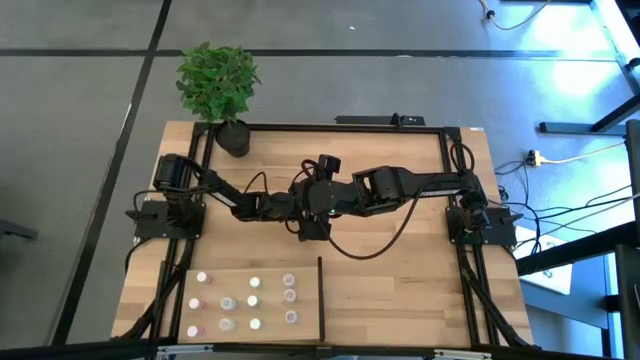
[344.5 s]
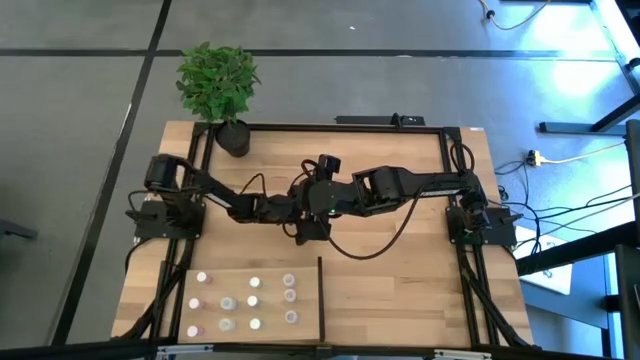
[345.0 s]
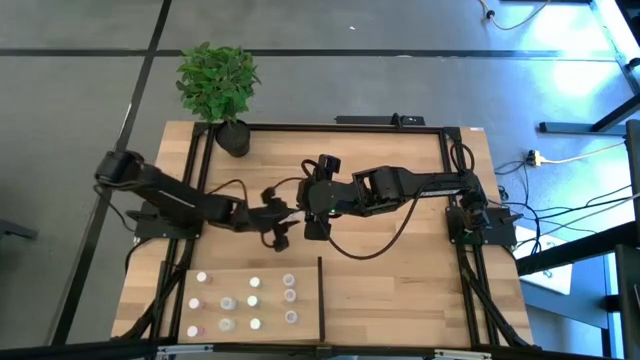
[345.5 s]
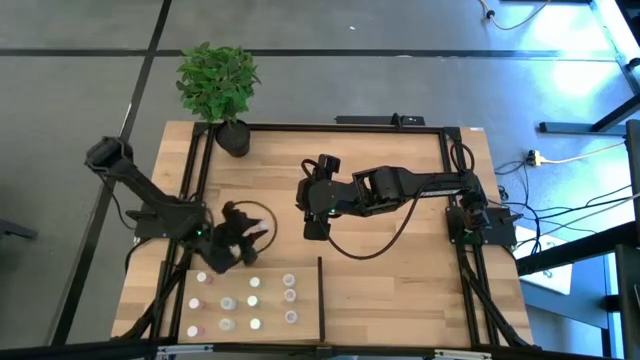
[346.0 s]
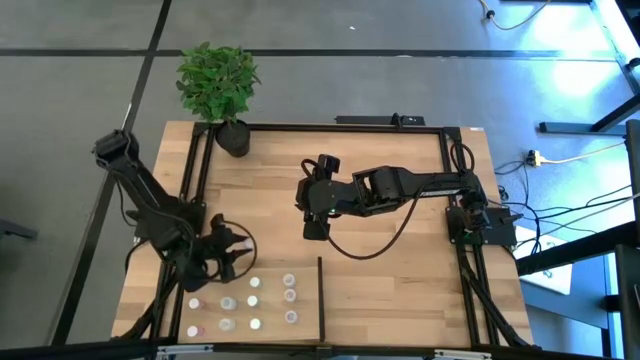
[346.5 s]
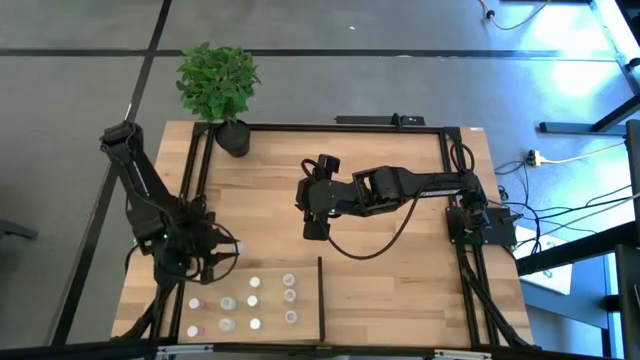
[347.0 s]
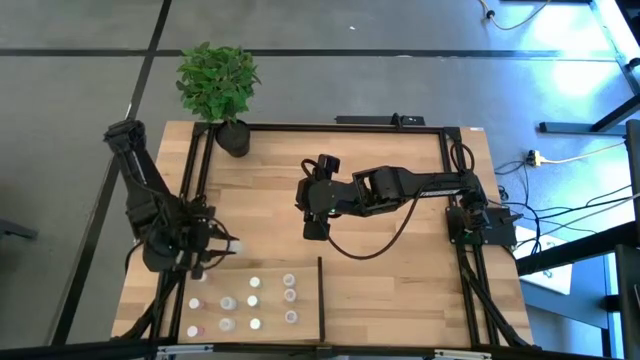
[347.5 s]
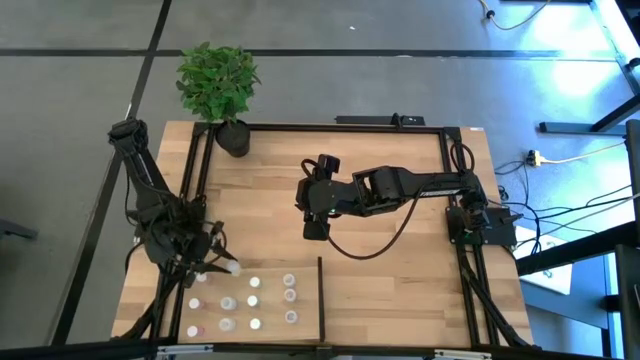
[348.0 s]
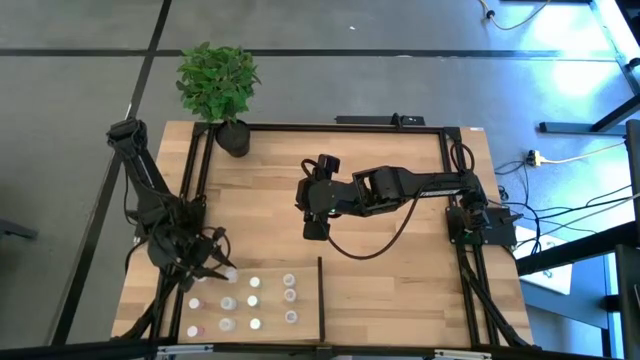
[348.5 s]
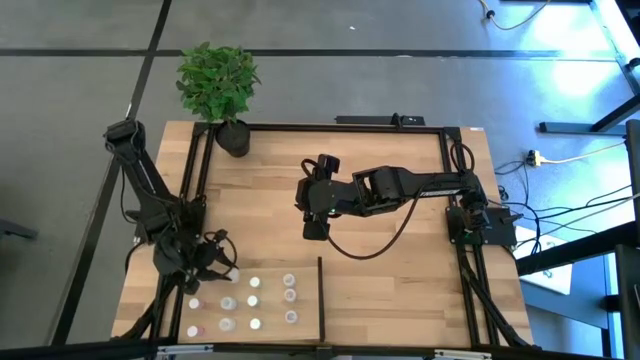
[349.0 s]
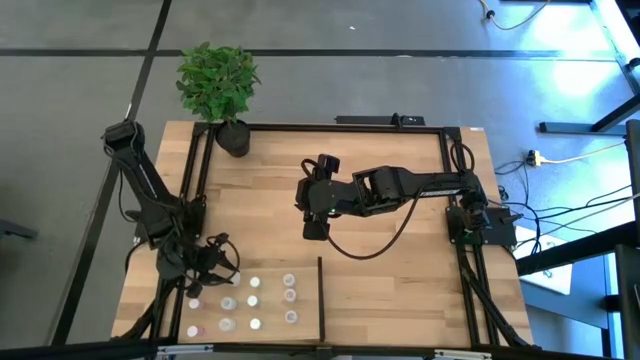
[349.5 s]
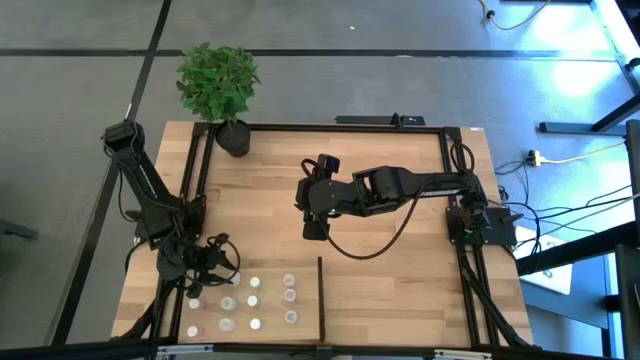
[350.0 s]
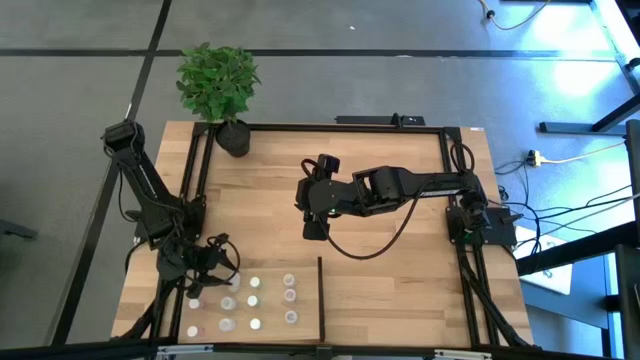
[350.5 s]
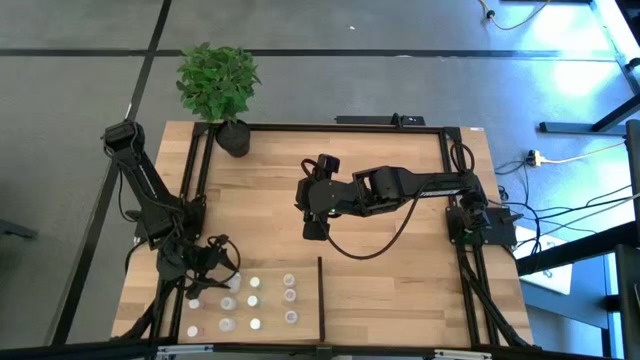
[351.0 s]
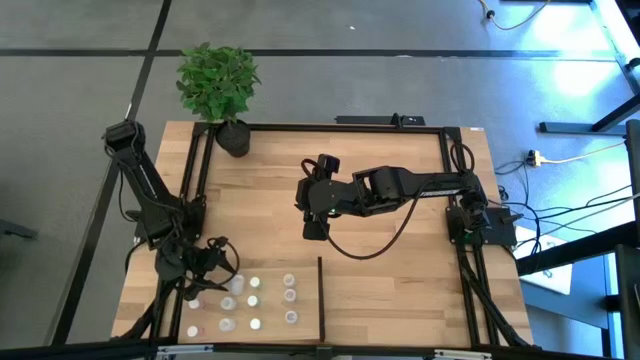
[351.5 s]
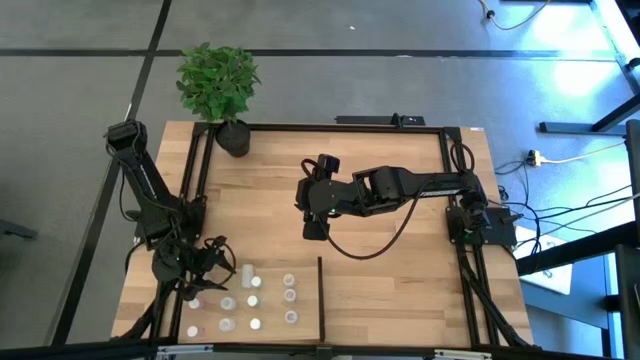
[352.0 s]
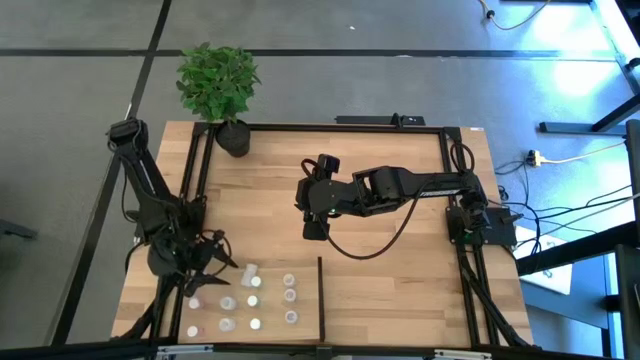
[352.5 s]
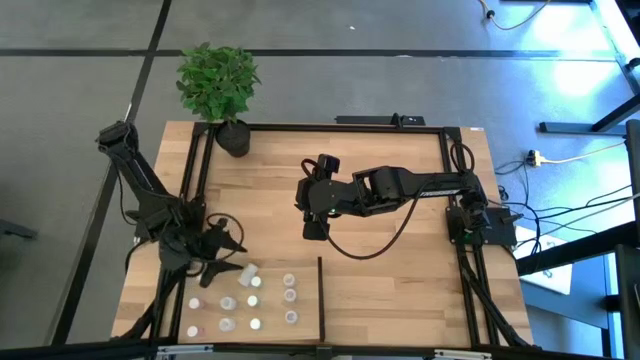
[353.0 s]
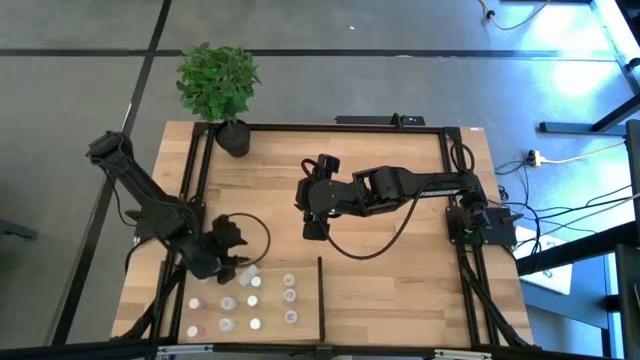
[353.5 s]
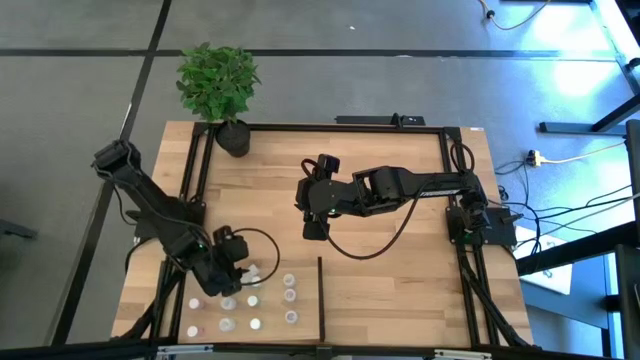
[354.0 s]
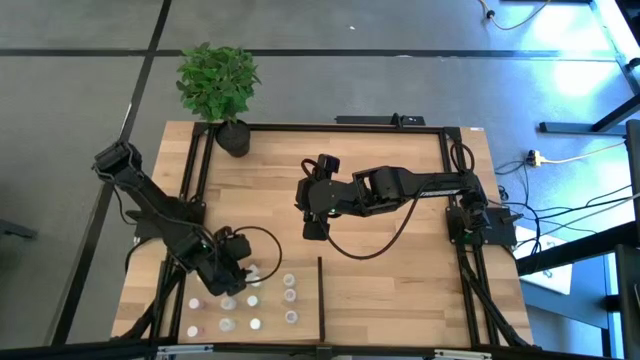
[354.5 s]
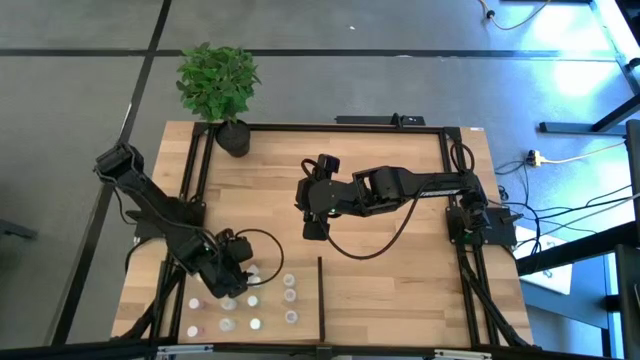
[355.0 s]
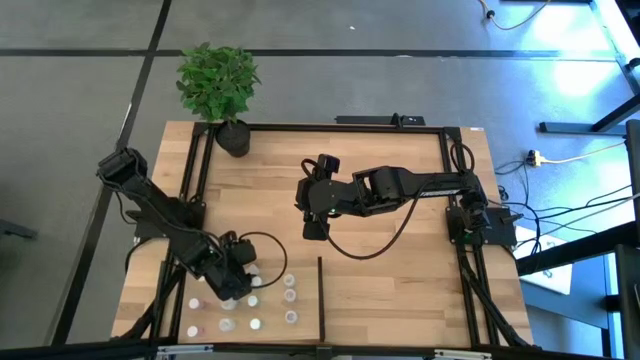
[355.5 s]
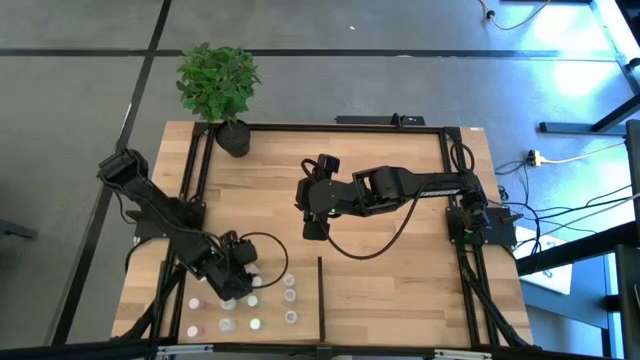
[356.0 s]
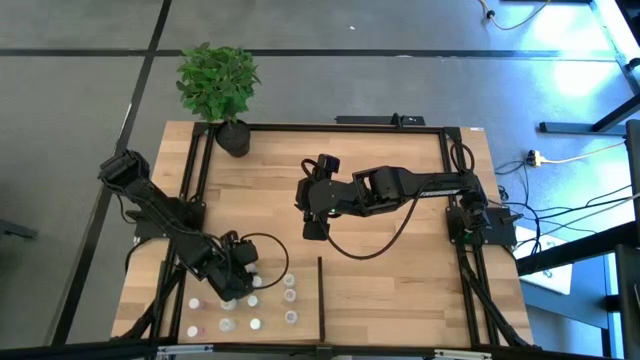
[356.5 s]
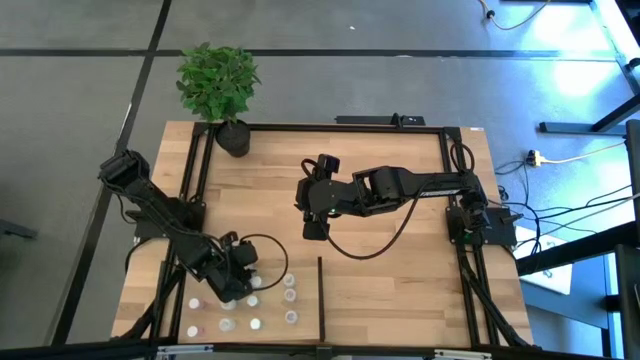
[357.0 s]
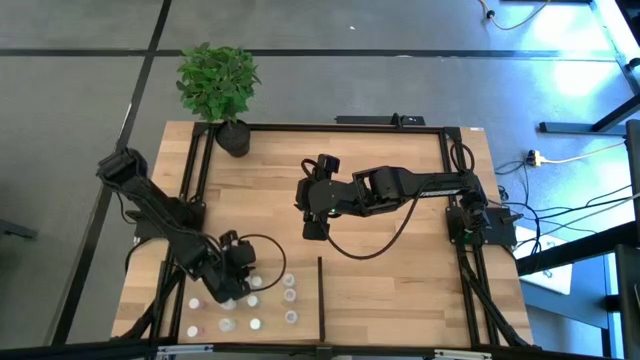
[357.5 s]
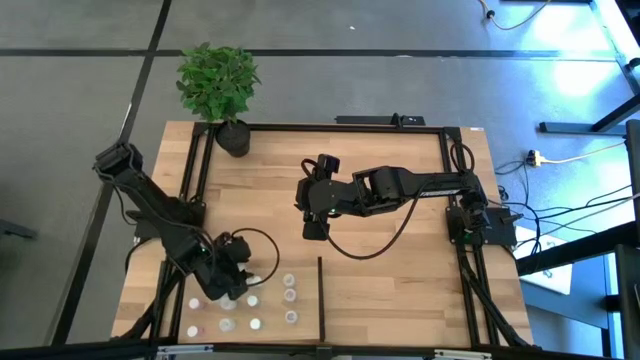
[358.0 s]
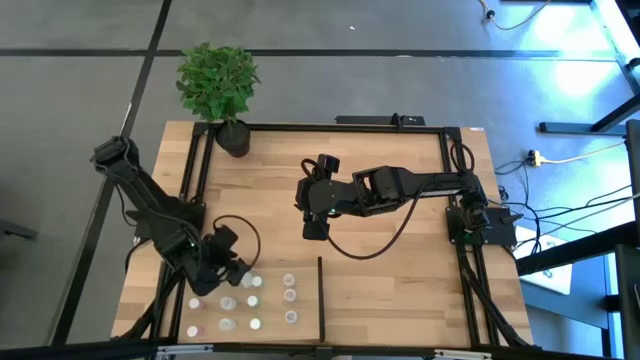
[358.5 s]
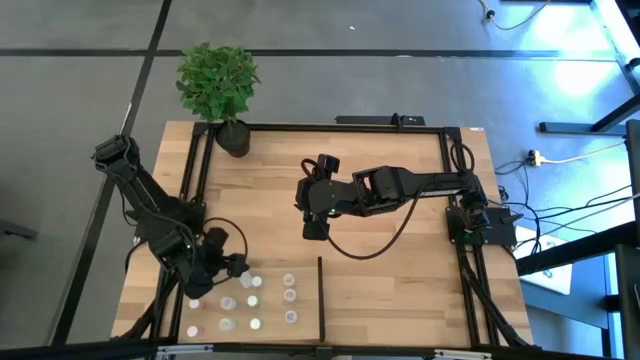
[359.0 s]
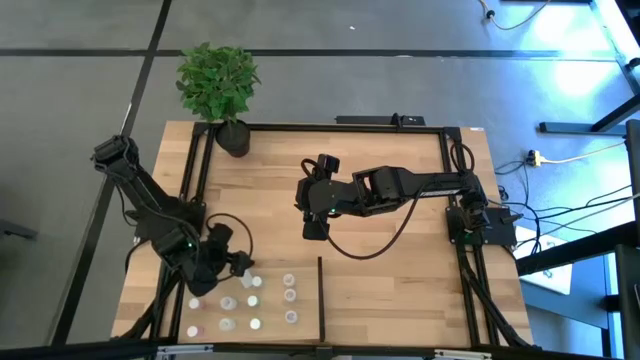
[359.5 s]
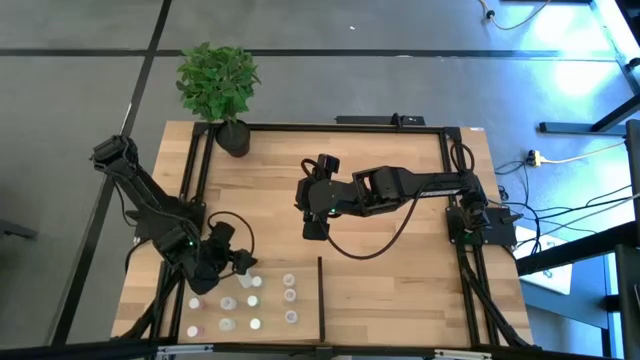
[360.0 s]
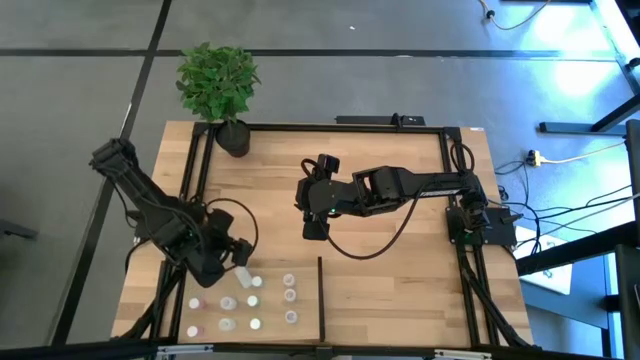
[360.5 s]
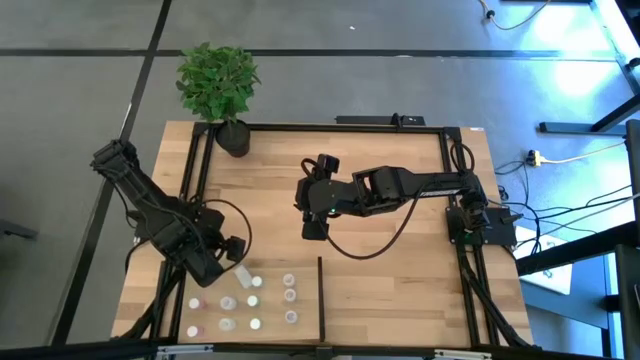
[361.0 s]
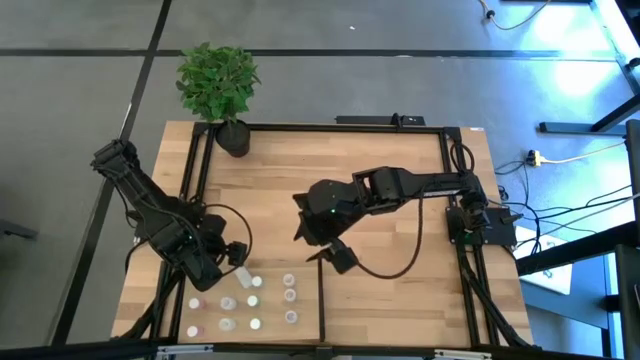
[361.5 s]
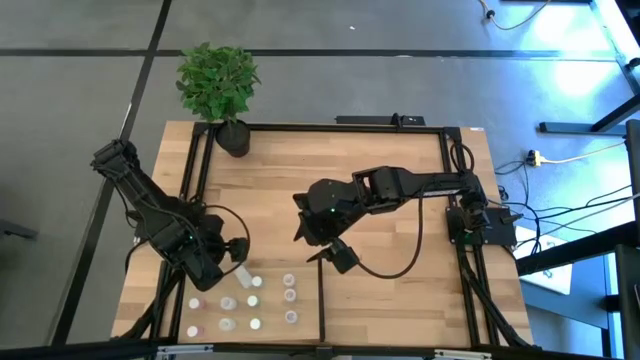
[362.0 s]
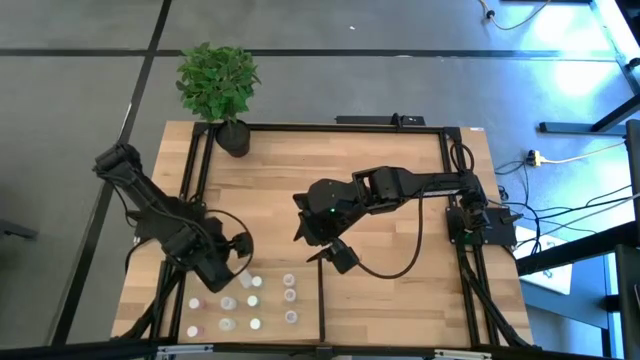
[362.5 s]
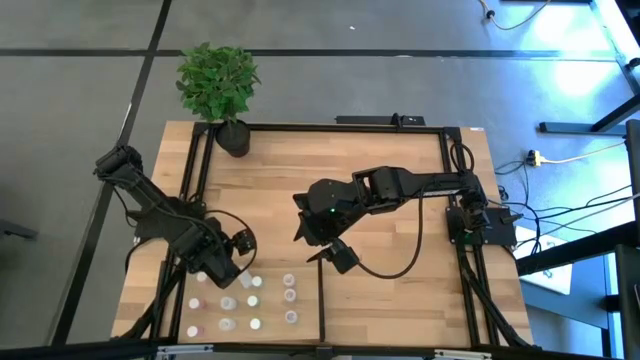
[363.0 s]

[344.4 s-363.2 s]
Task: Pick and place medicine bottles onto shelf by color
Put the white pill bottle on the shelf aligned with the other white pill bottles

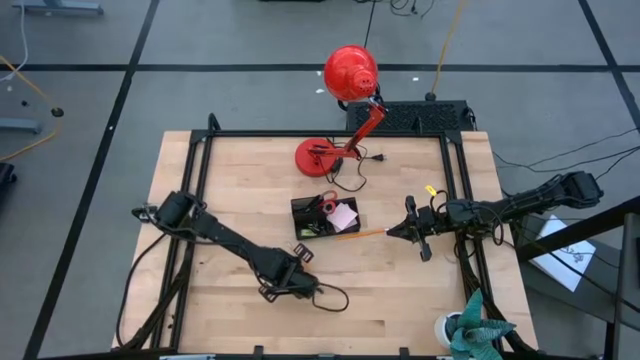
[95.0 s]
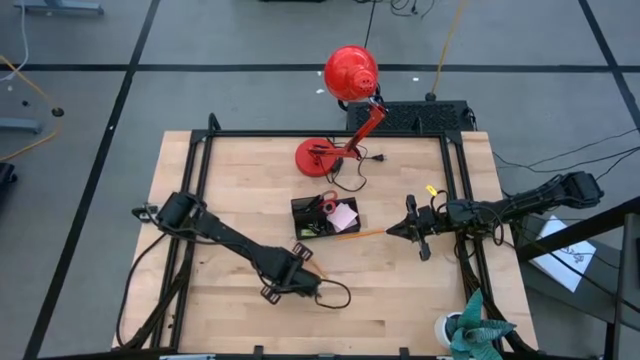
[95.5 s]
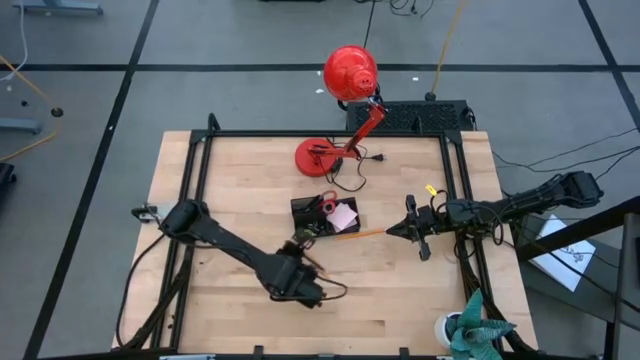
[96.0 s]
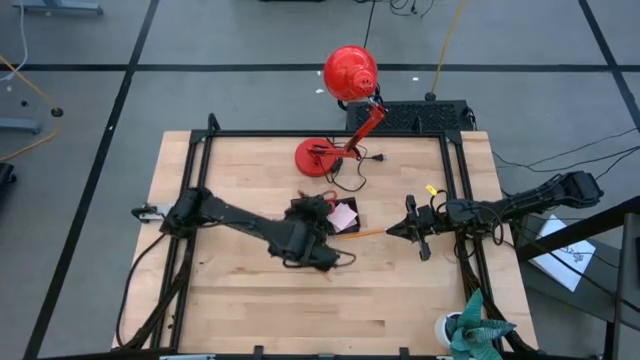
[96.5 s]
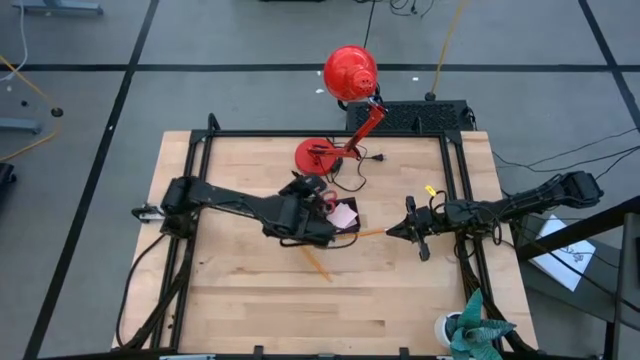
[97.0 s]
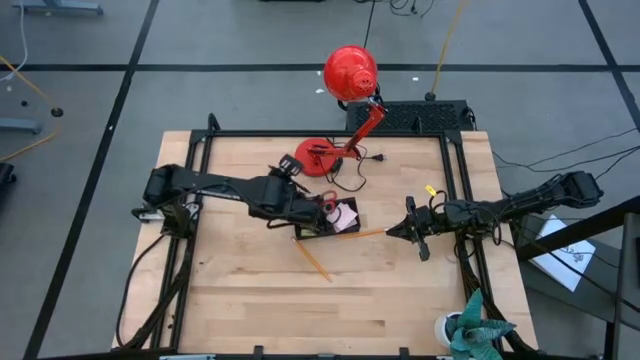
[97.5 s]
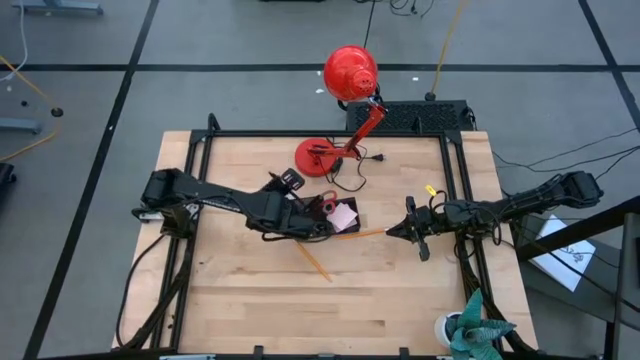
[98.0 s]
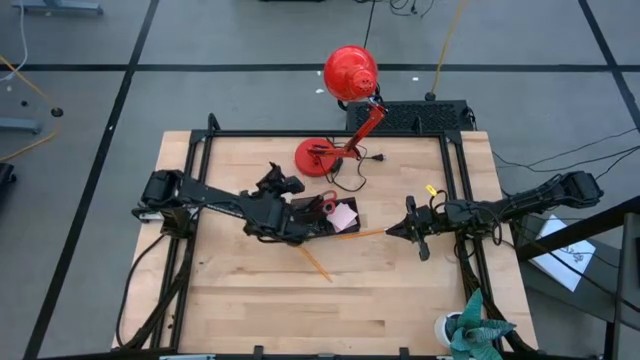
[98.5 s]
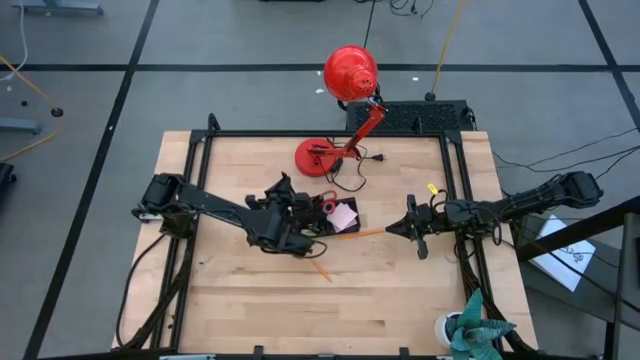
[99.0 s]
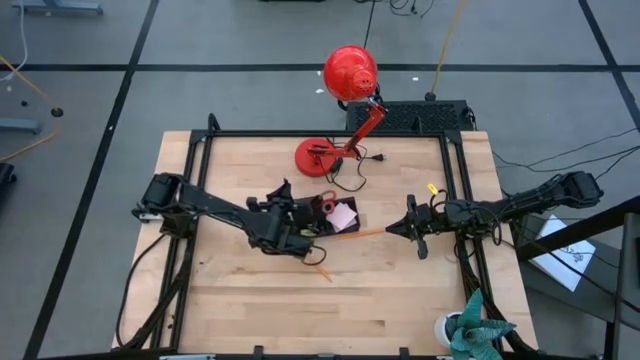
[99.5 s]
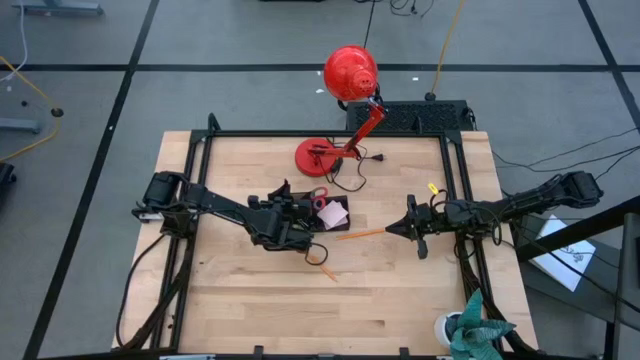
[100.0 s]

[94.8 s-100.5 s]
Task: Pick and place office supplies into organizer
Put the black pen into the desk organizer
